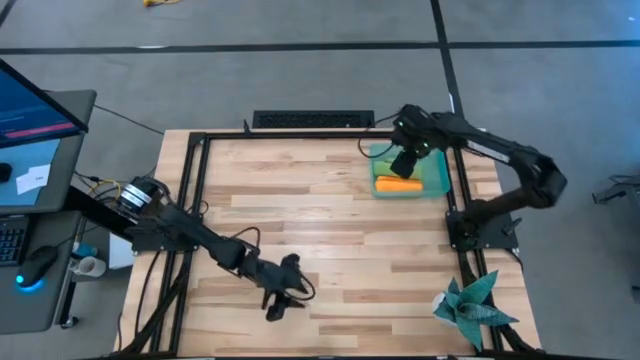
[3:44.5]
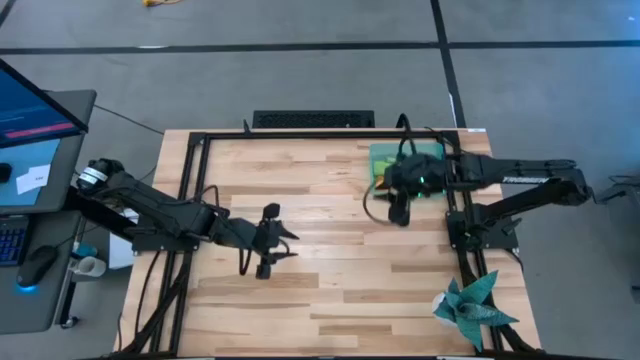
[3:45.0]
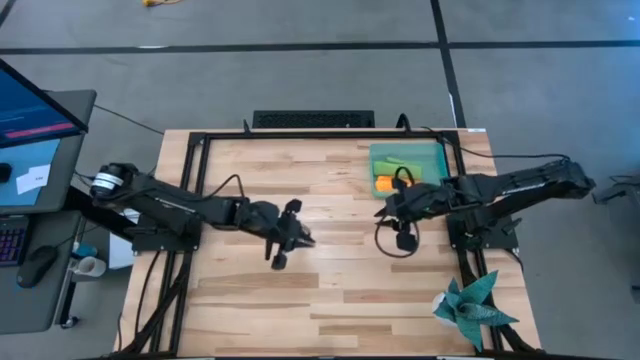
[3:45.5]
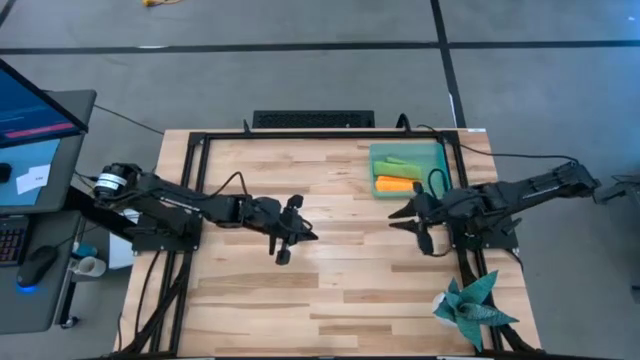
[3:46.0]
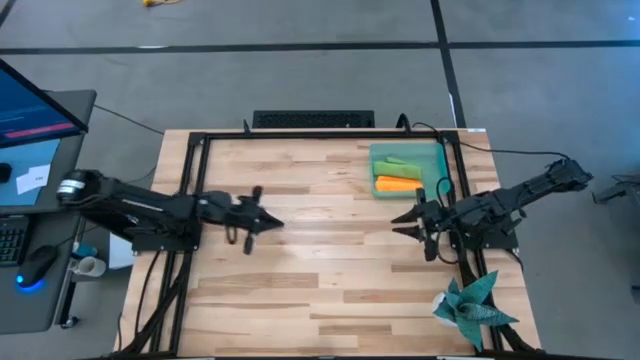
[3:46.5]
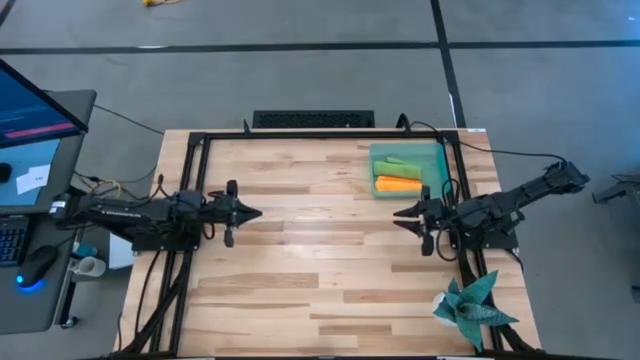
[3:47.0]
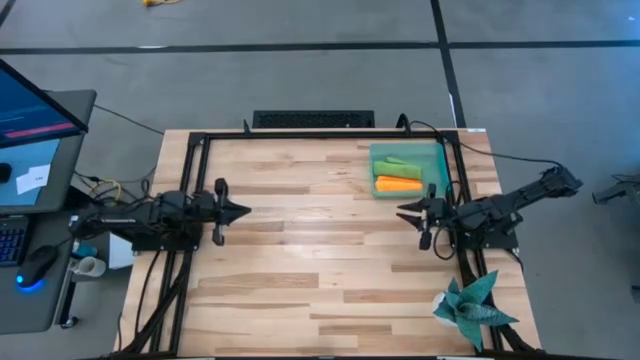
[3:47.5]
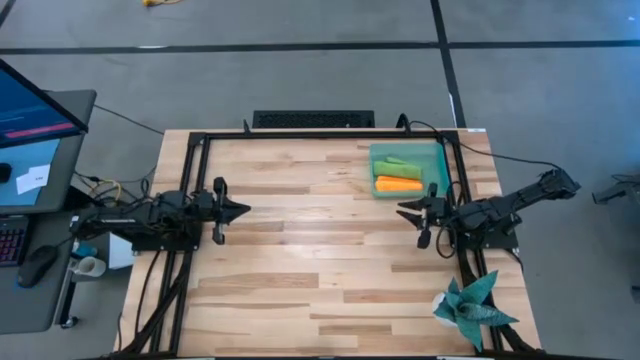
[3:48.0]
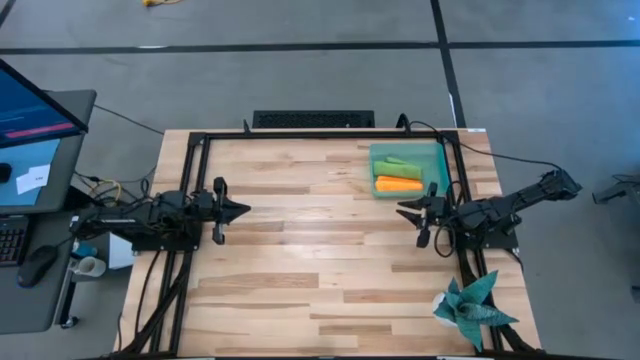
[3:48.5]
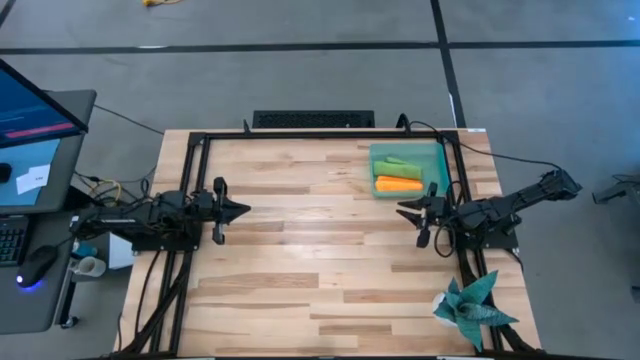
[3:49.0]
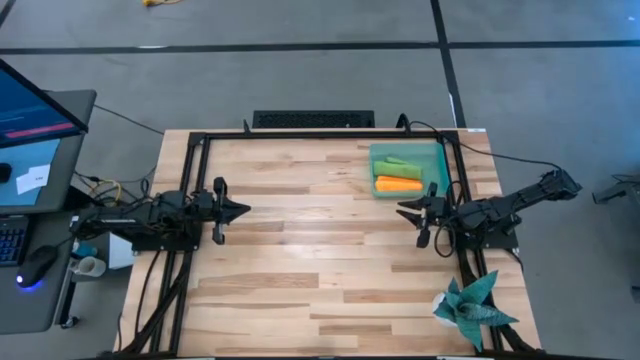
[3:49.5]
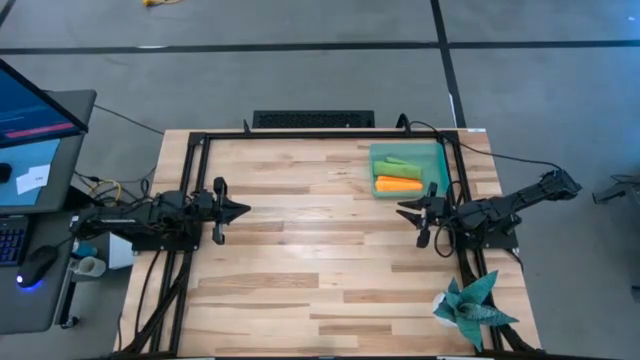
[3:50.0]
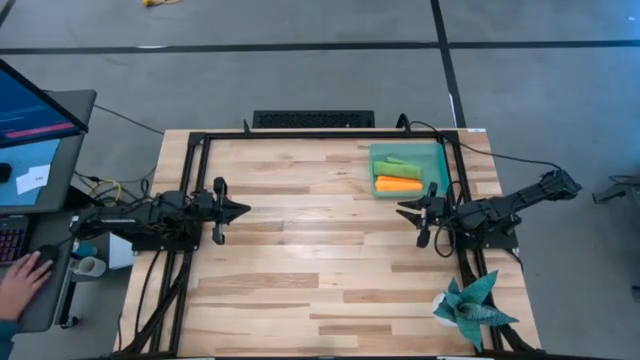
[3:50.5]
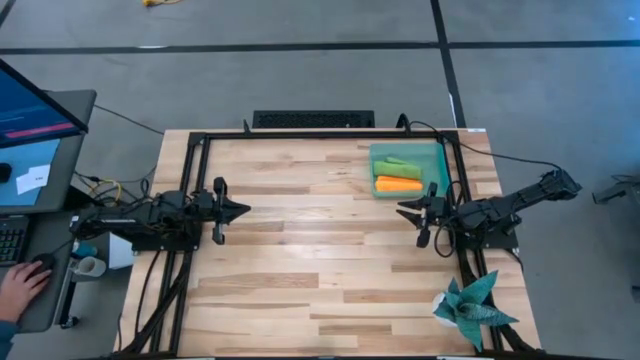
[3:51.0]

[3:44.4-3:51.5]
Task: Roll microfiber towels into tight, uniform cylinder then place into a basket
Return to Home Position

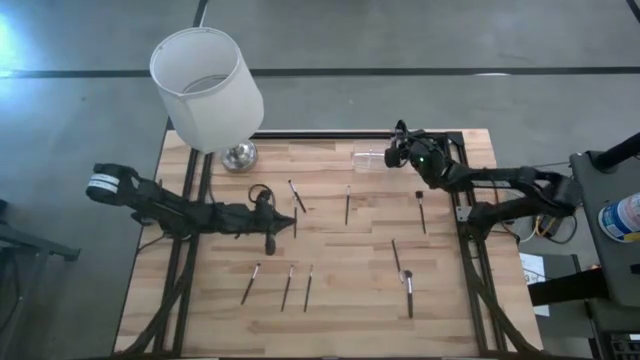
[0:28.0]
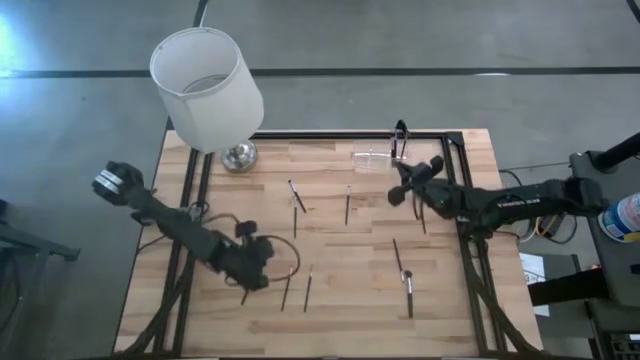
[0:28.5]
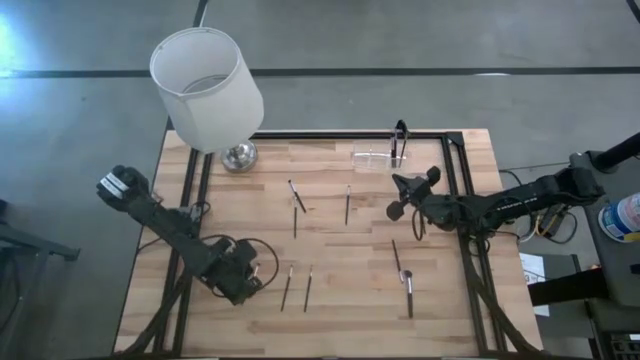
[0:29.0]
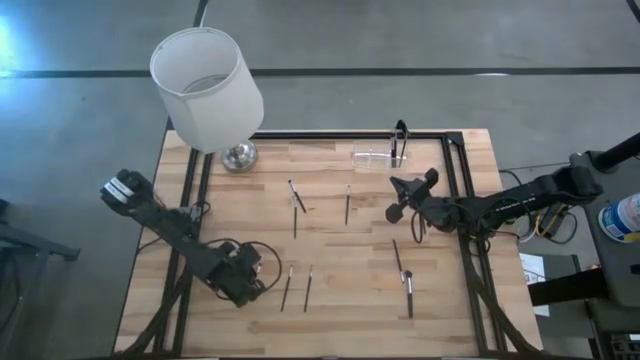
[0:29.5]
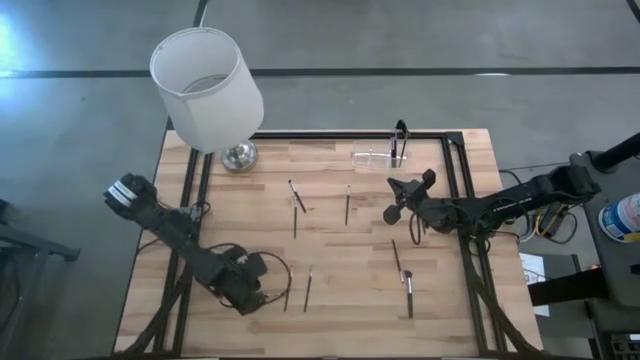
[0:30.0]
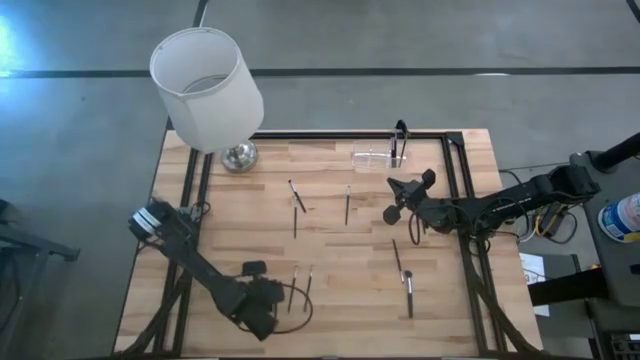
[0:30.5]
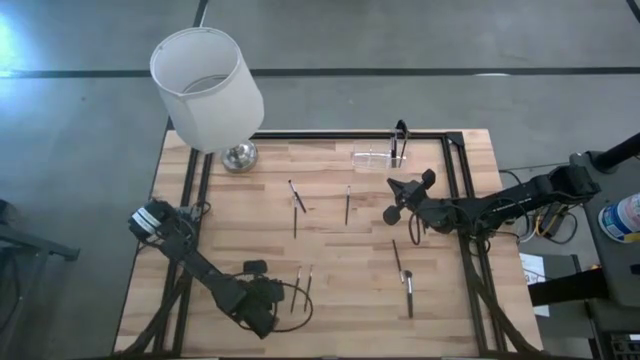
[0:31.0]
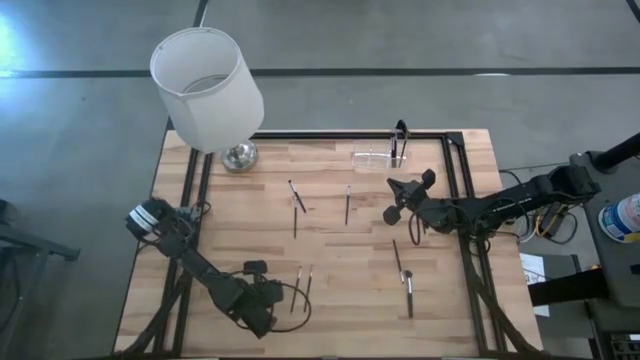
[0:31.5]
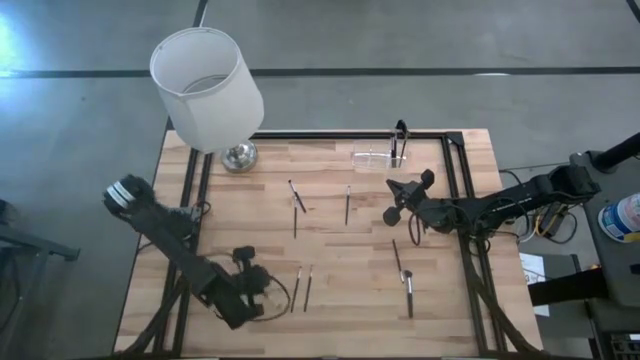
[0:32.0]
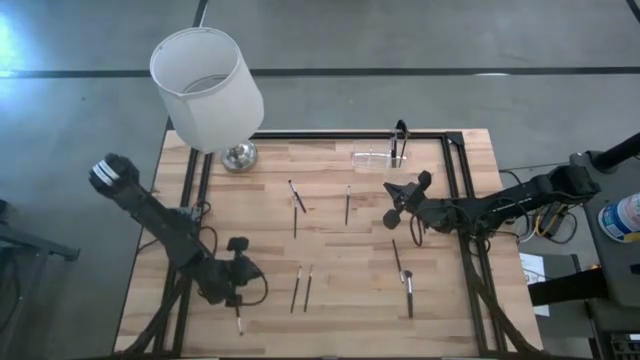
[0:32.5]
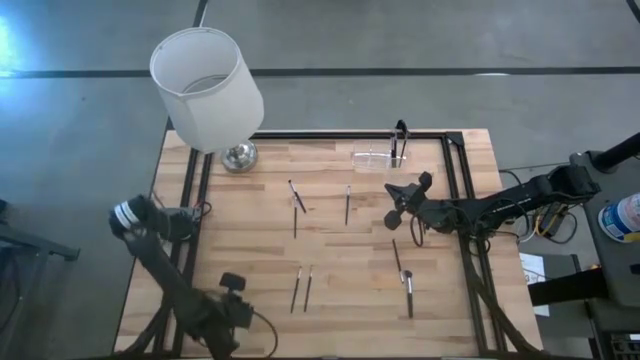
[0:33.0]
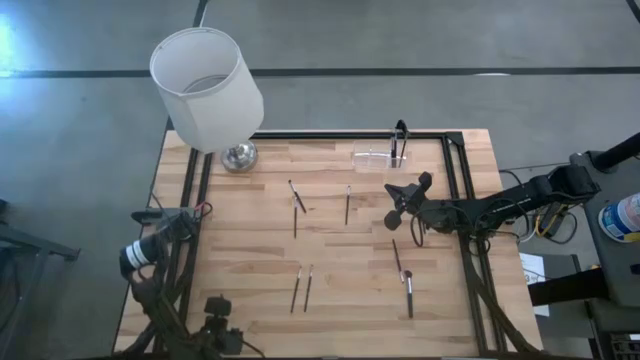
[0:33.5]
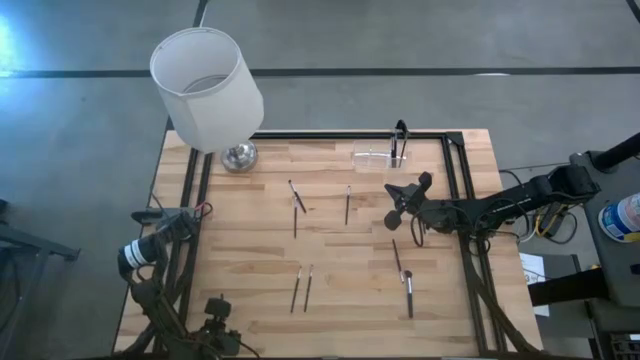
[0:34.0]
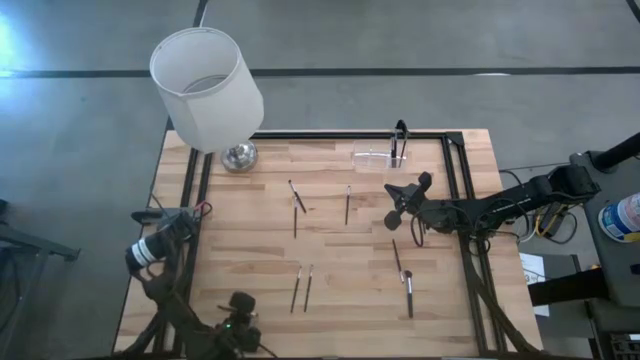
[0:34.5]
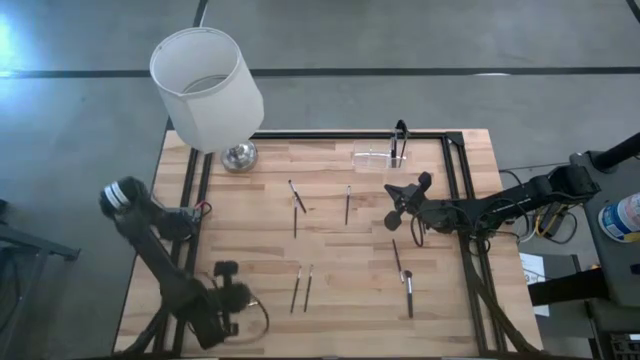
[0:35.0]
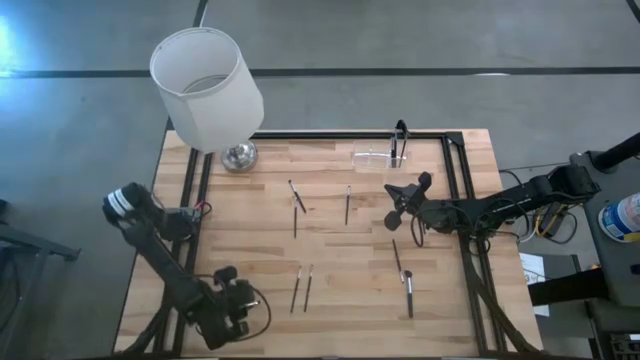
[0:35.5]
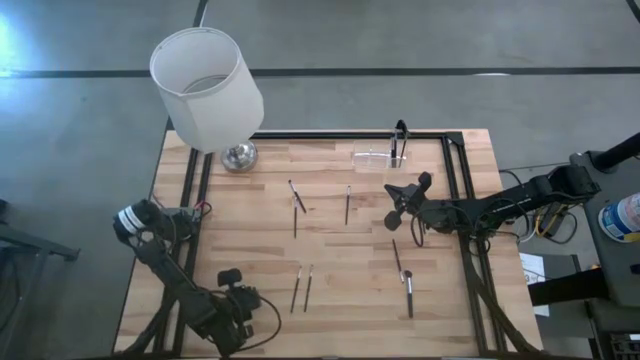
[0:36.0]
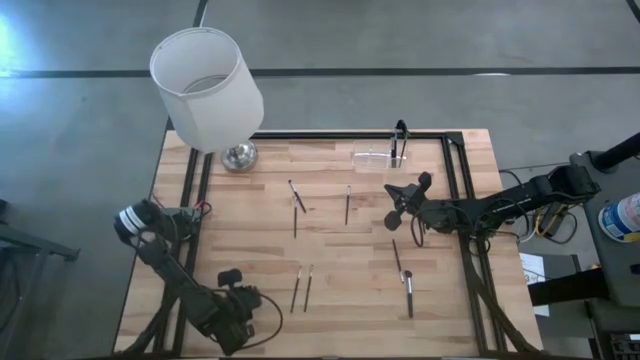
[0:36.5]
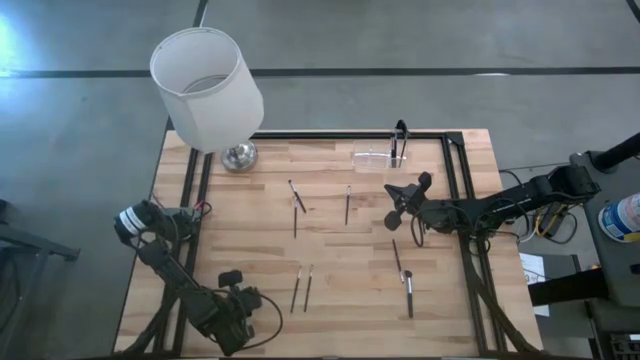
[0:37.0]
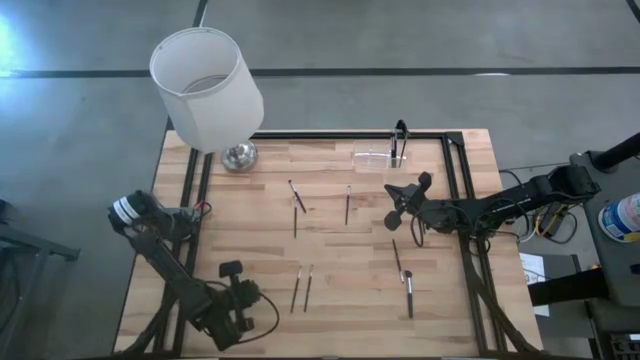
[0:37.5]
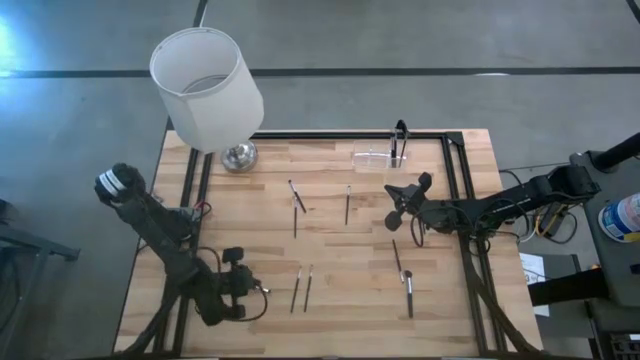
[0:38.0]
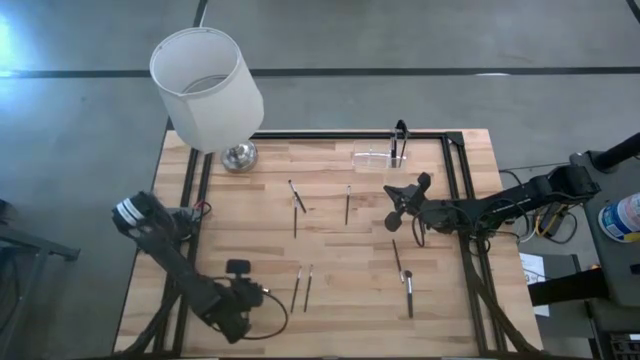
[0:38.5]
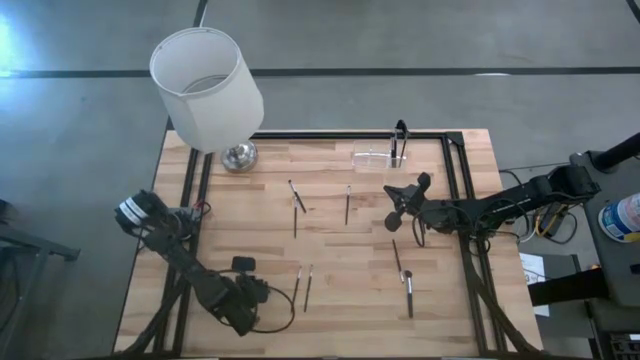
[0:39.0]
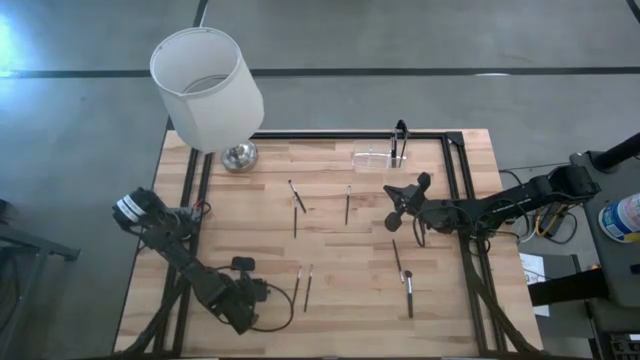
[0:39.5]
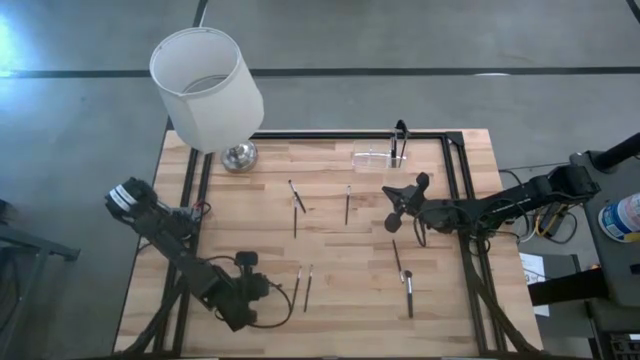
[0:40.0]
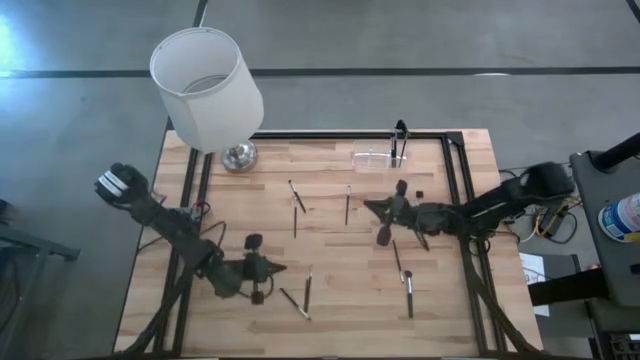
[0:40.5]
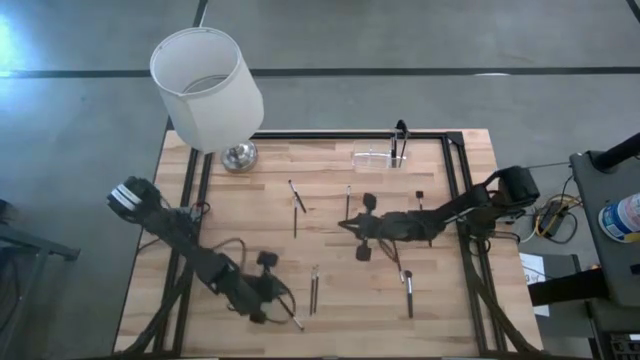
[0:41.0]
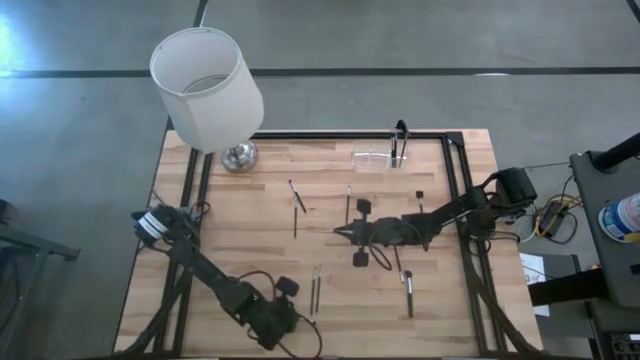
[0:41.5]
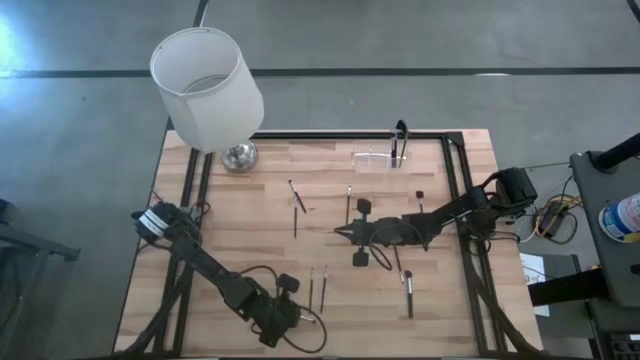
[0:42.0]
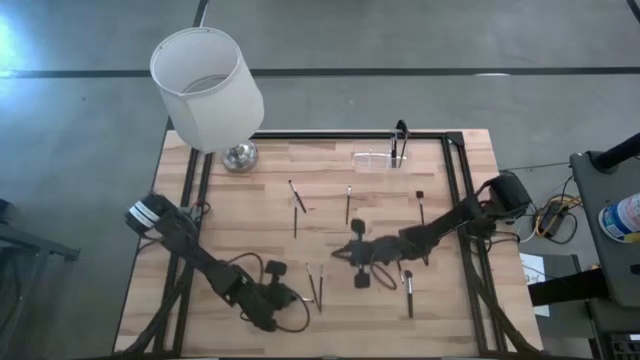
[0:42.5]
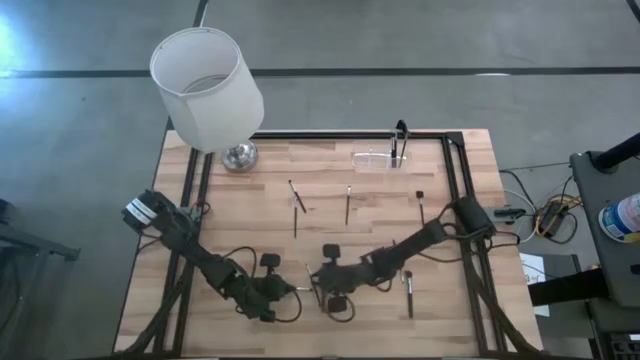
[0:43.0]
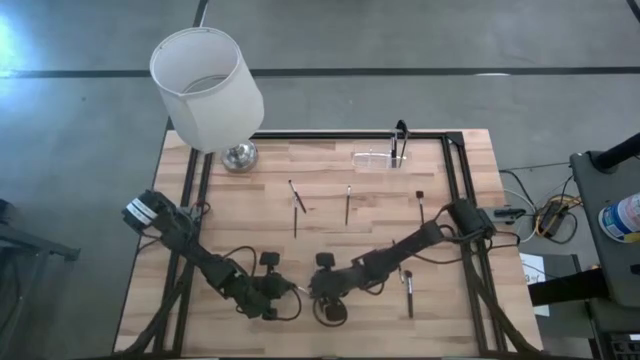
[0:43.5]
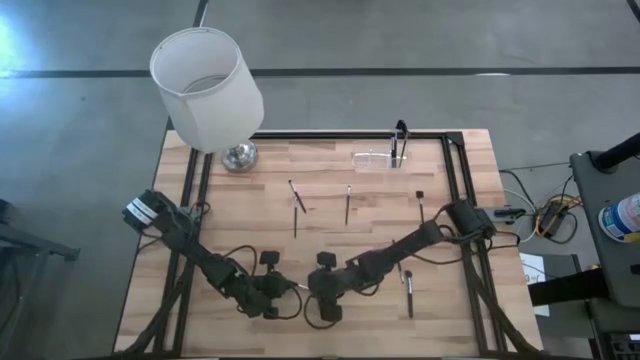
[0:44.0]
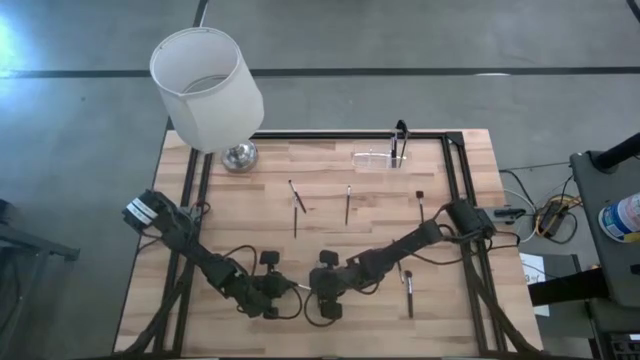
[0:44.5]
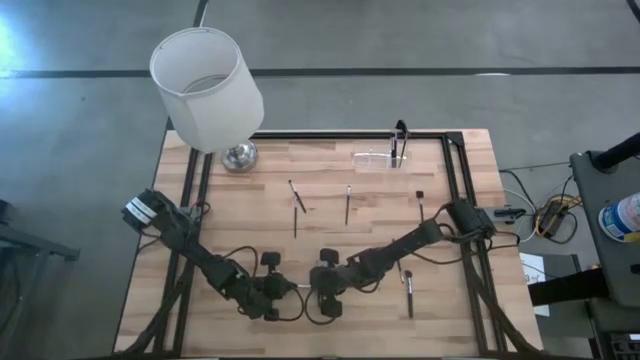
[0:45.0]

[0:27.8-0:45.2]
Task: Put items in baskets/containers
Put the foundation brush into the transparent organizer
